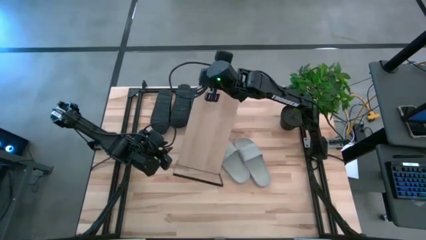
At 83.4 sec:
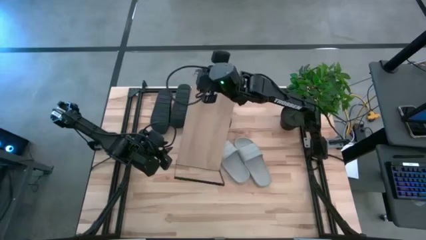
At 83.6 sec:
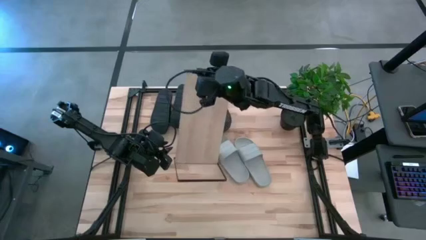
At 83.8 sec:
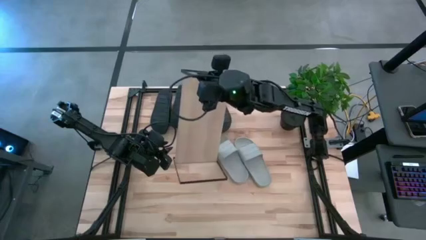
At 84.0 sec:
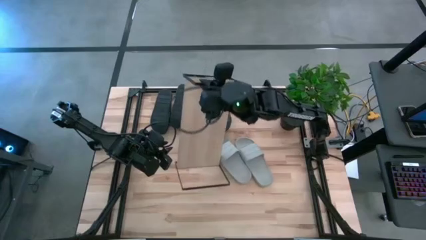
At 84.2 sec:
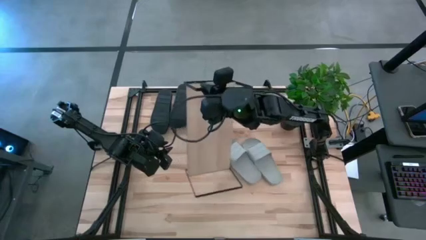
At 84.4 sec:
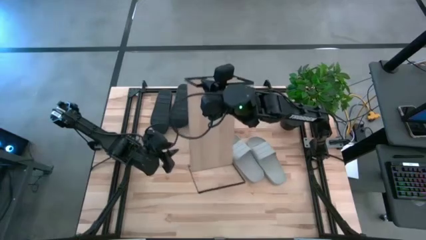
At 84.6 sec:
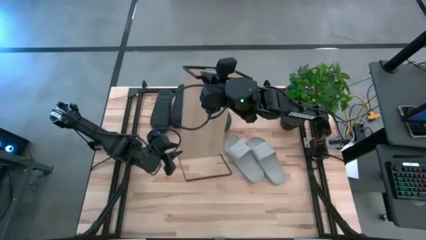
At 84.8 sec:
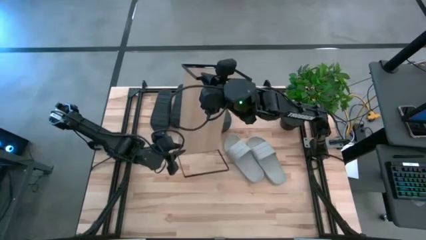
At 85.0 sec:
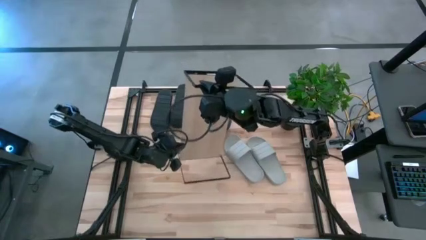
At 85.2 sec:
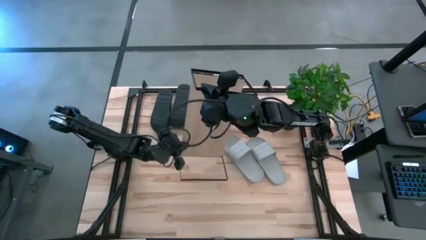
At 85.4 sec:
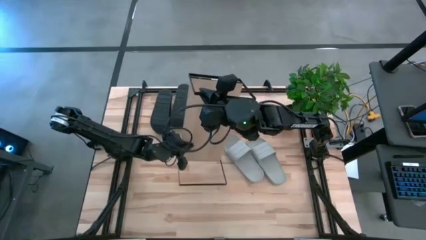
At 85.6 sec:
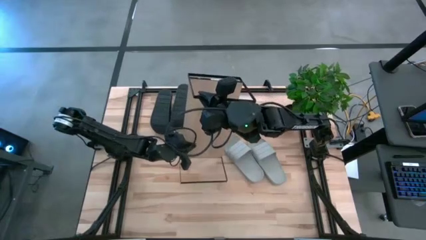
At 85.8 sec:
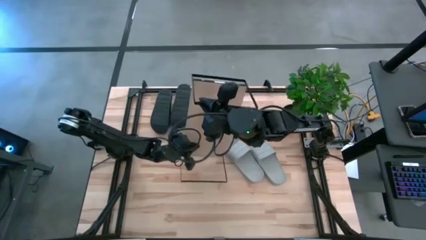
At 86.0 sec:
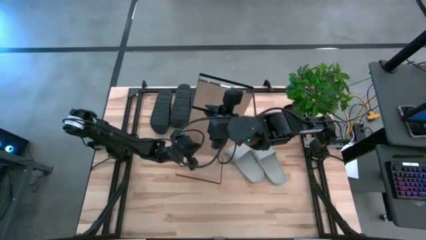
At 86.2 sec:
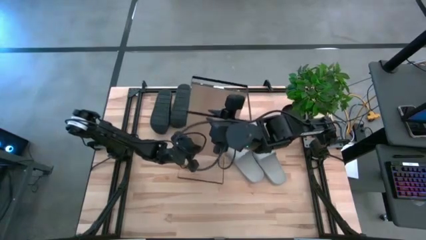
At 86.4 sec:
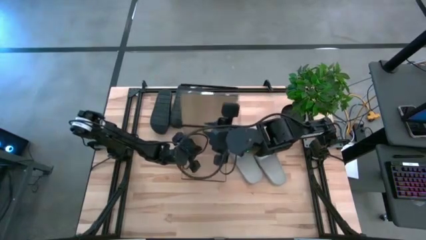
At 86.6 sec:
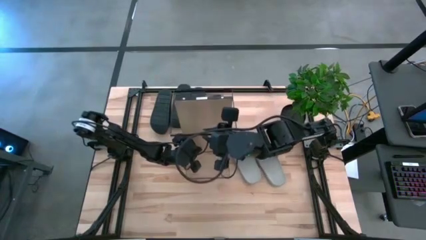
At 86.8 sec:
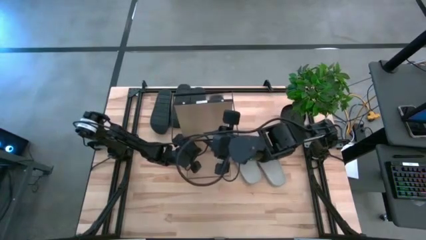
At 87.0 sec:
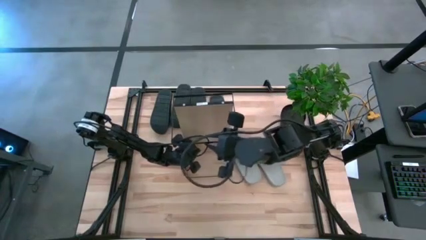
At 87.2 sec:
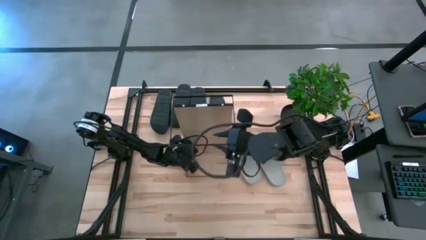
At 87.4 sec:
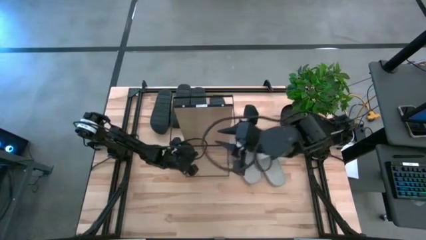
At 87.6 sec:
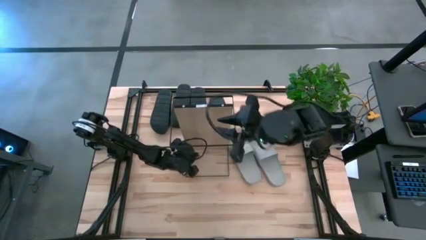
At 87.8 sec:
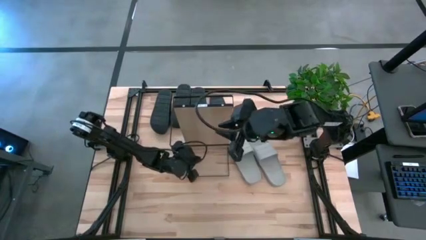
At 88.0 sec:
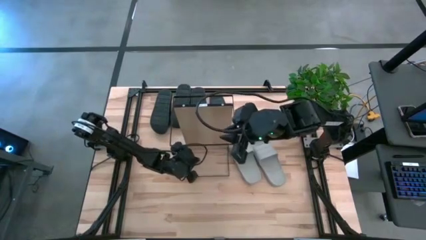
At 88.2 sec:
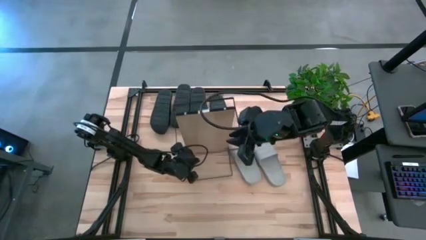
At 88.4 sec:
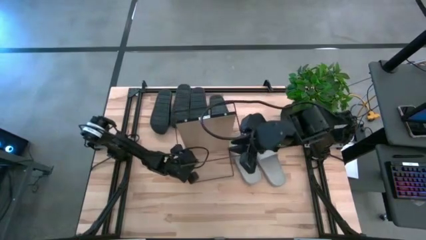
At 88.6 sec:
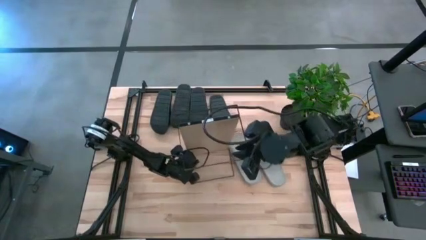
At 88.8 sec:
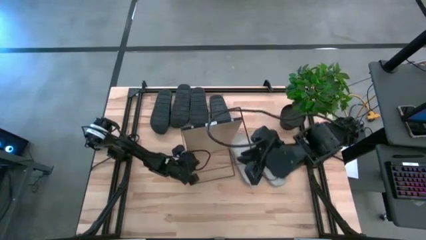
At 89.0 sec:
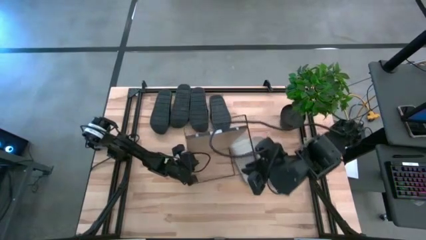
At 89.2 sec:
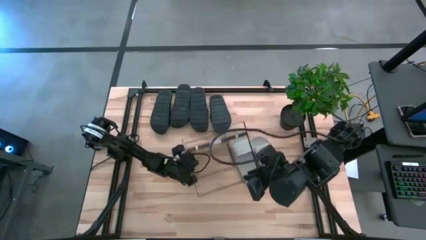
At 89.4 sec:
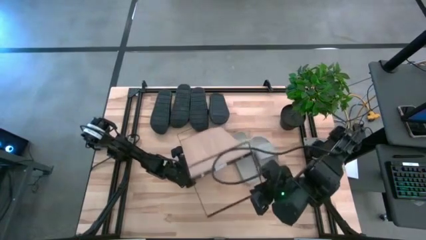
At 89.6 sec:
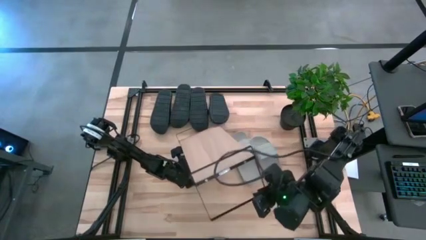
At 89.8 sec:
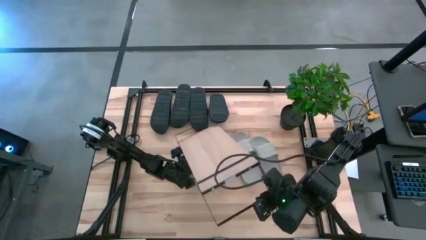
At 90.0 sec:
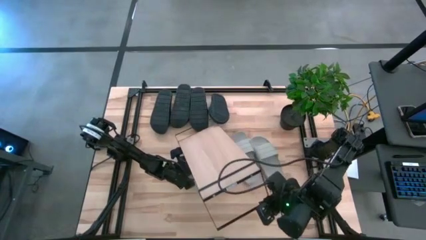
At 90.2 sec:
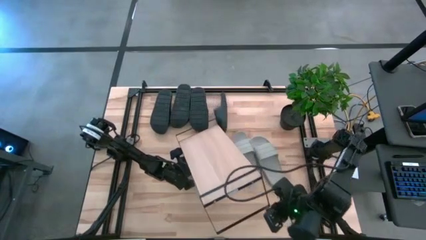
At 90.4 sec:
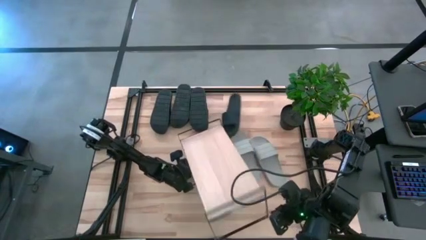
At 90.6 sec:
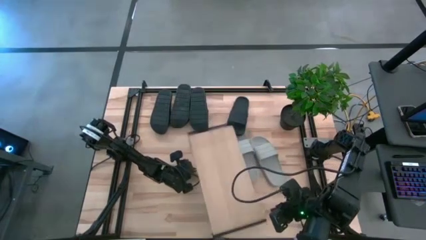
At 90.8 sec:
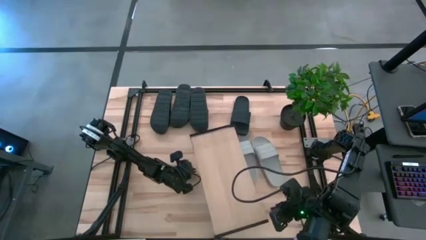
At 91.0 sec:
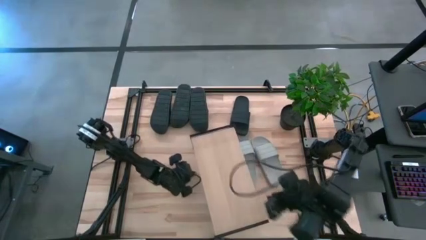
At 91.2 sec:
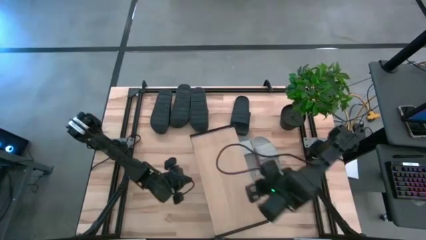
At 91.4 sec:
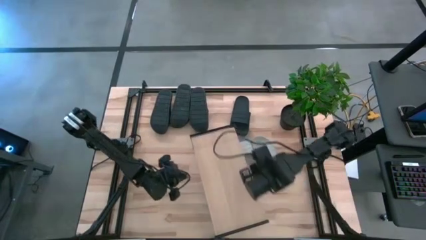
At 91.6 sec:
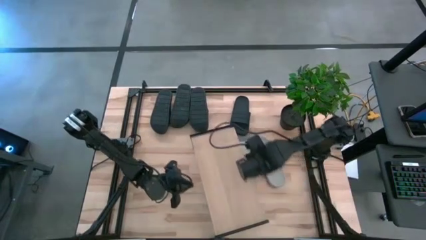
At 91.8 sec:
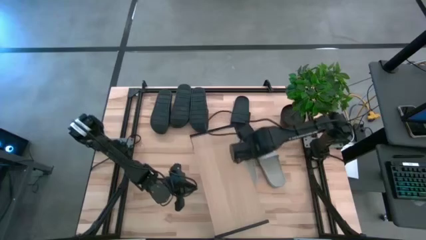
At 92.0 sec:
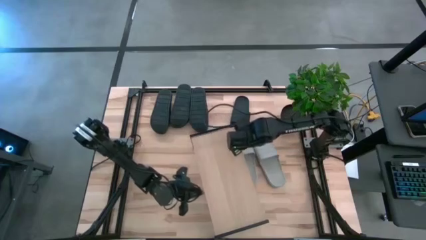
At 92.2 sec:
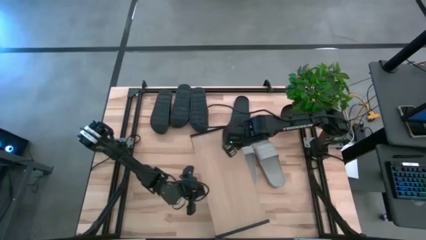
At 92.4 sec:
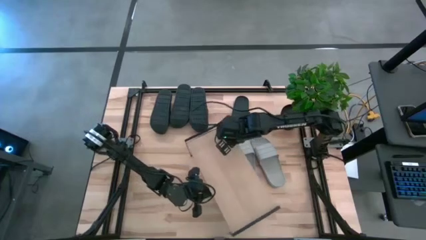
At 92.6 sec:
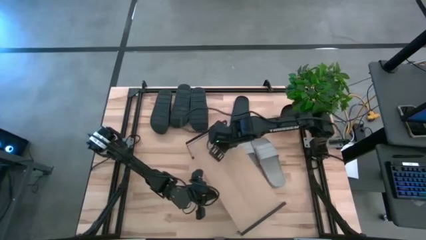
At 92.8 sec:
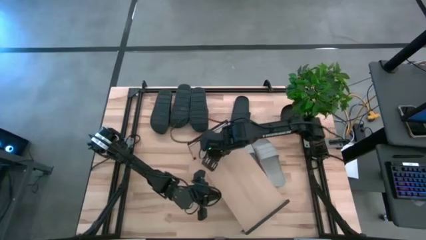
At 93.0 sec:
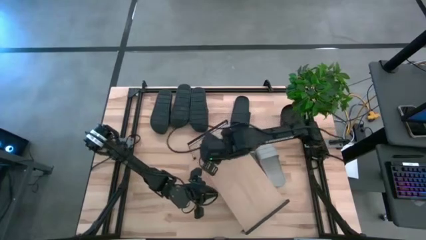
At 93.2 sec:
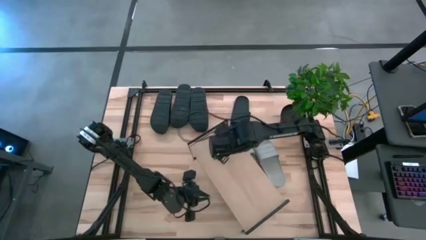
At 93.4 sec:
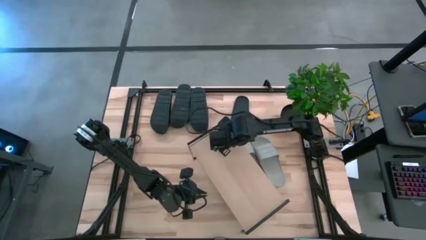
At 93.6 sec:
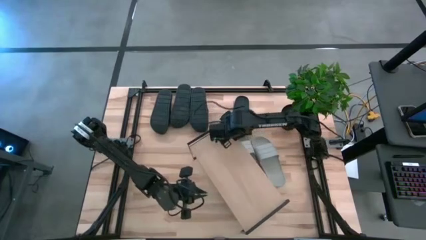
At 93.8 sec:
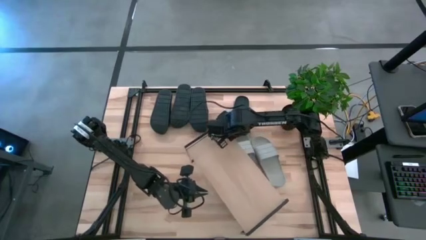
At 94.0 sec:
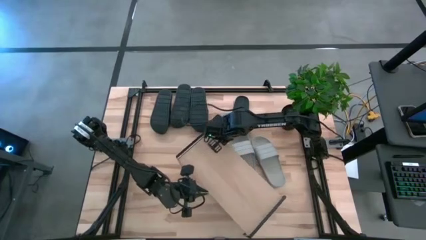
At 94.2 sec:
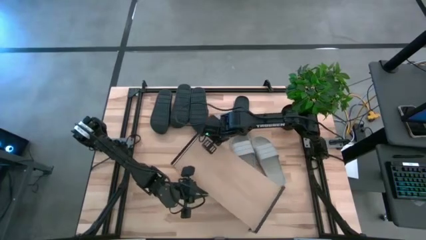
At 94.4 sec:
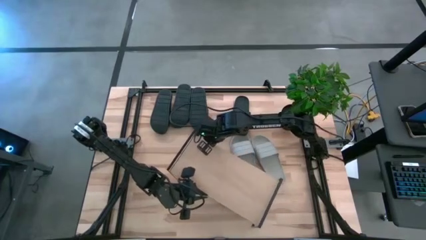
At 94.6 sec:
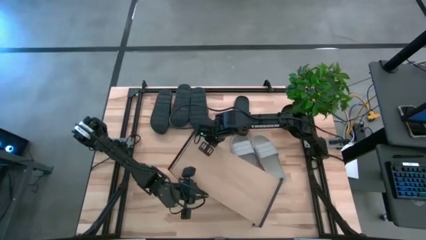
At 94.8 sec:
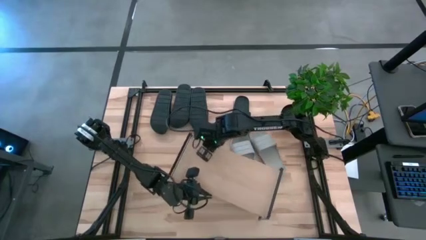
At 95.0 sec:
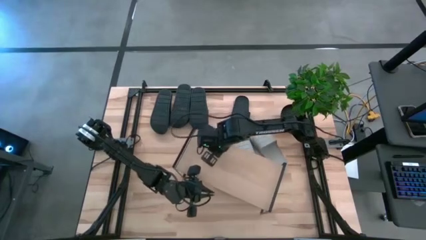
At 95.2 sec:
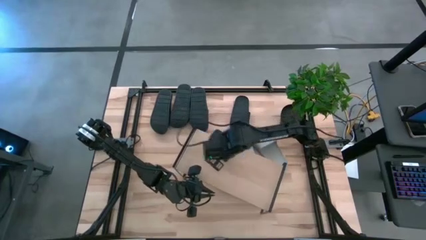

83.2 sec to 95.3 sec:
Task: Pick and place slides into the shelf
Move the shelf to the bottom right of the table

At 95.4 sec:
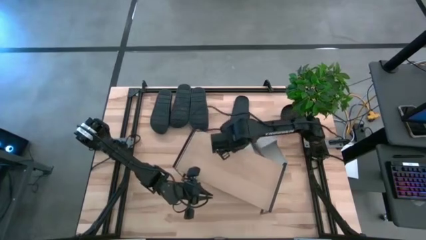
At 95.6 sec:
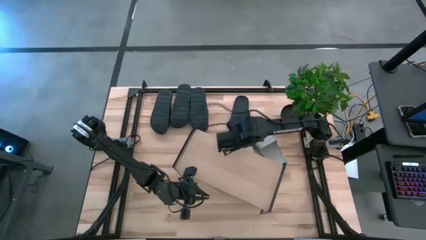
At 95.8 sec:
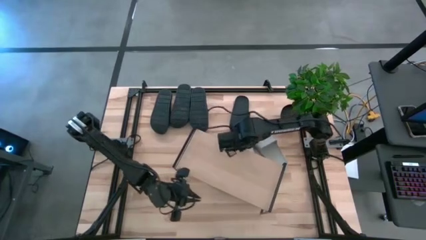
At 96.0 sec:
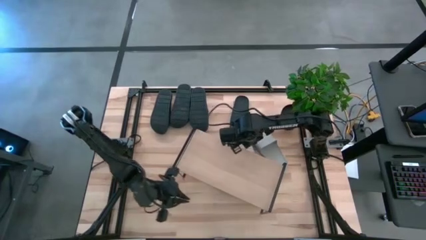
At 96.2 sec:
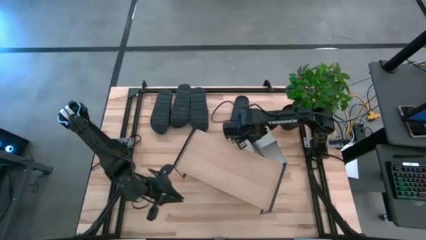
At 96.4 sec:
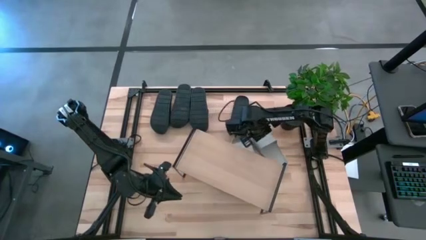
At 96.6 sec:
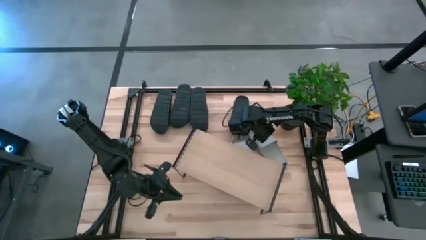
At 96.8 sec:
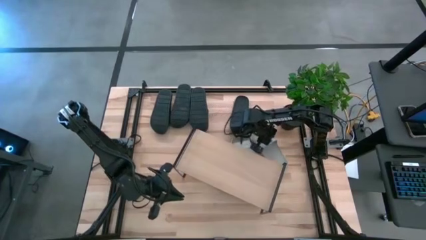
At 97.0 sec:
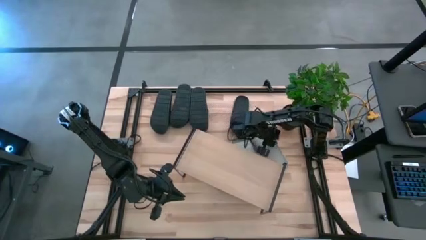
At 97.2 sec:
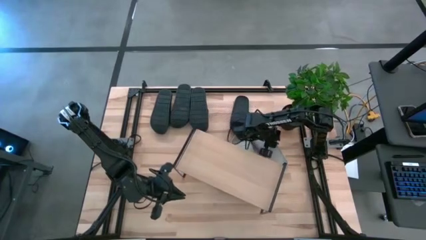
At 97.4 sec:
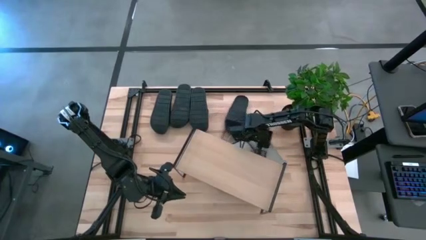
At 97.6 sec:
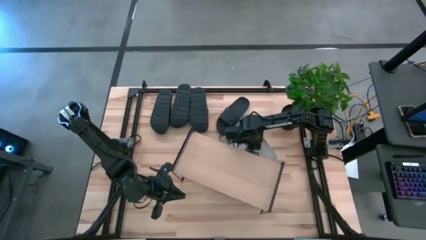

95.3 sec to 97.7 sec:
Adjust the gray slippers

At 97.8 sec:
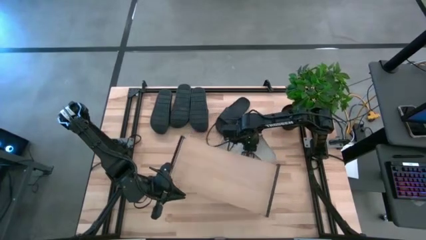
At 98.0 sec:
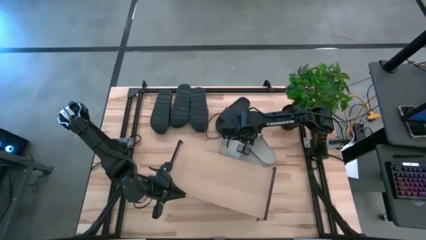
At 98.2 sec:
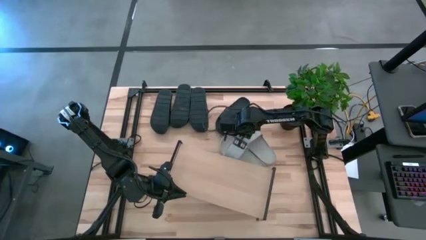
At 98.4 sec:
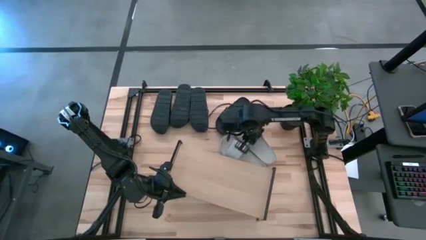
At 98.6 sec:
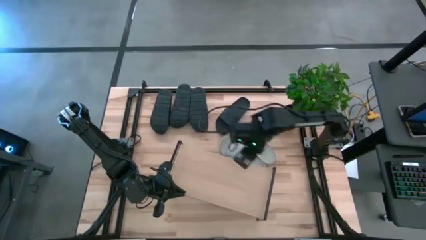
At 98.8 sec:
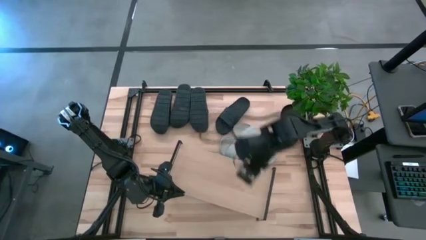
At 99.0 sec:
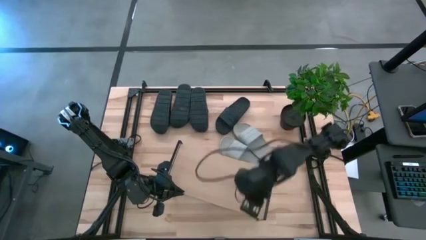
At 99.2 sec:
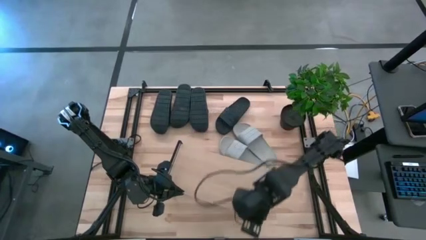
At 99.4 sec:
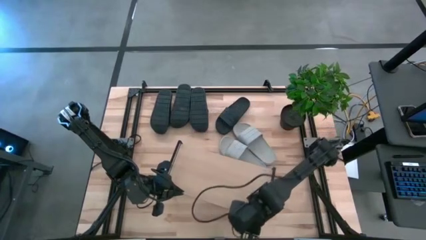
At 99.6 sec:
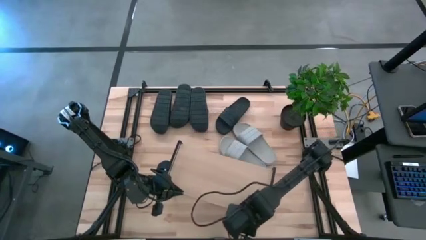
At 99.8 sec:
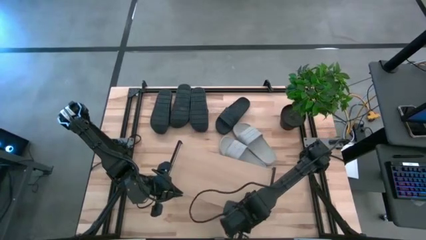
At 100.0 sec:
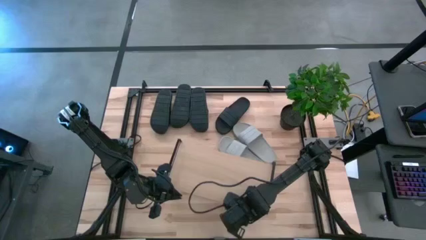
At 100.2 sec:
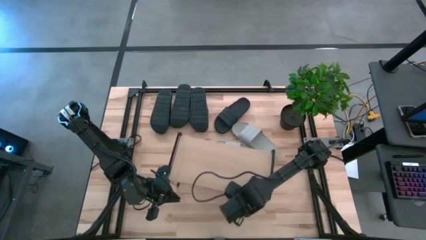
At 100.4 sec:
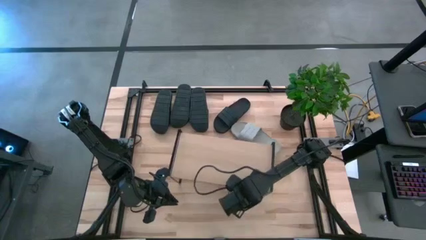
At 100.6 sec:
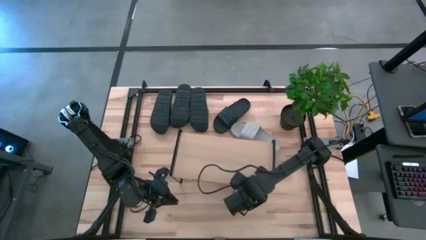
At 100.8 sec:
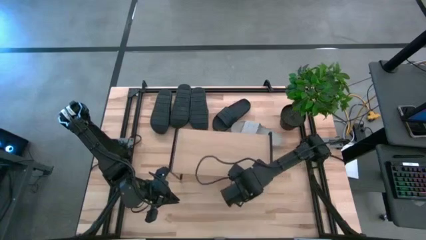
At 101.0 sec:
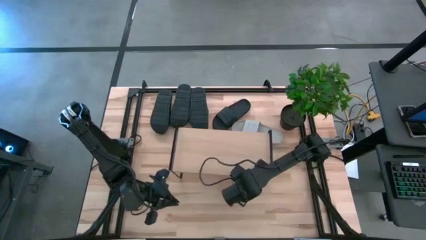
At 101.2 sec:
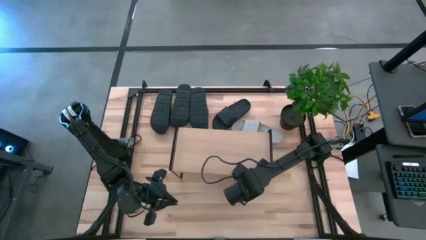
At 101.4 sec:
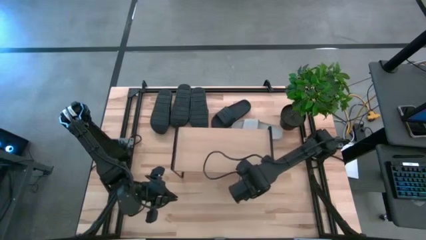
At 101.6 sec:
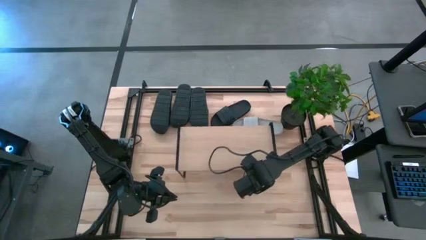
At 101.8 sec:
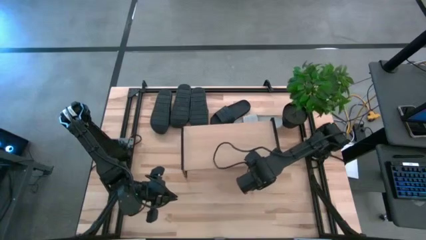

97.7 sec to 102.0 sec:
Move the shelf to the center of the table
